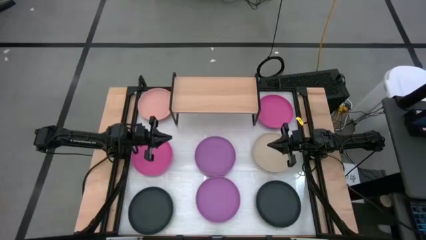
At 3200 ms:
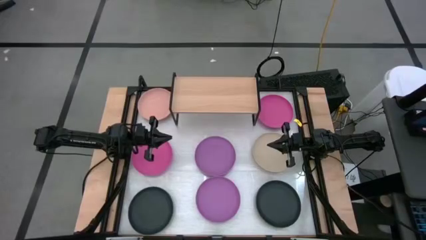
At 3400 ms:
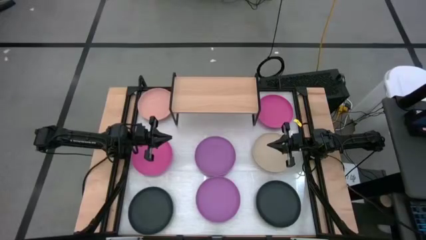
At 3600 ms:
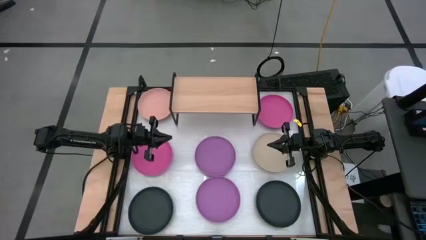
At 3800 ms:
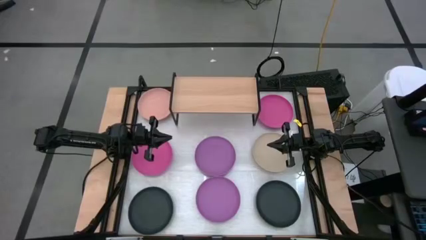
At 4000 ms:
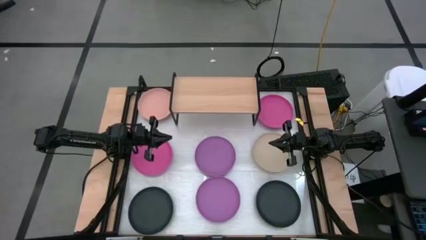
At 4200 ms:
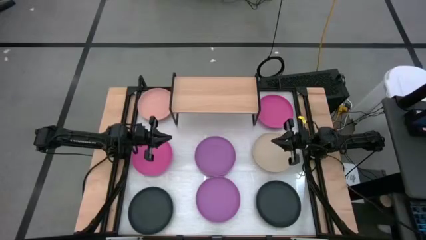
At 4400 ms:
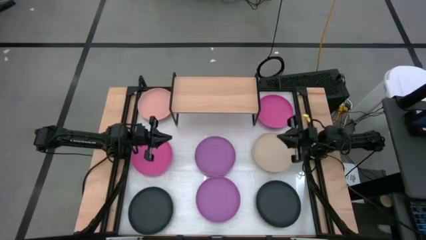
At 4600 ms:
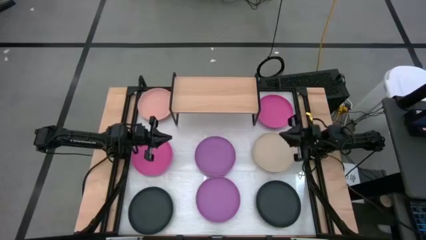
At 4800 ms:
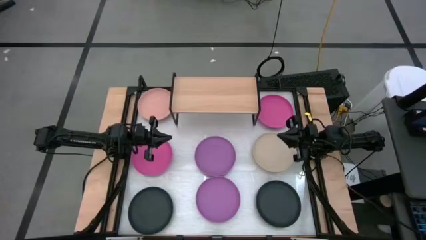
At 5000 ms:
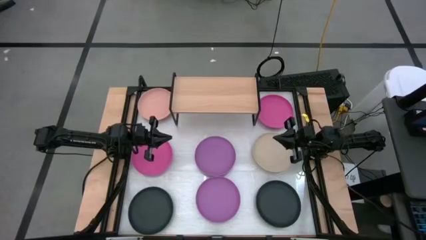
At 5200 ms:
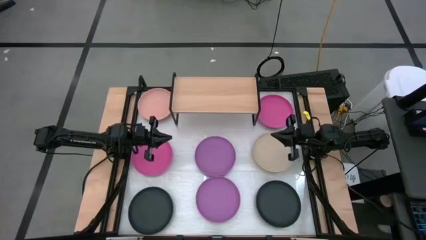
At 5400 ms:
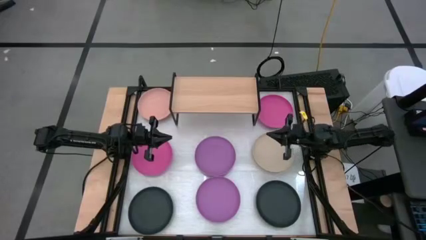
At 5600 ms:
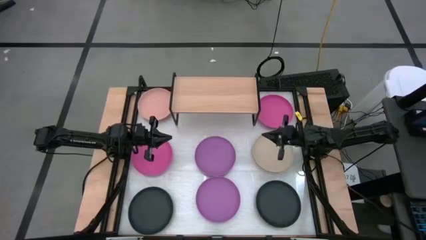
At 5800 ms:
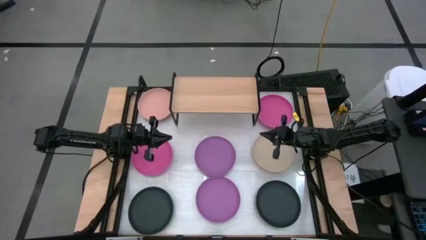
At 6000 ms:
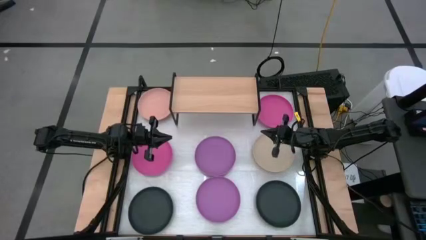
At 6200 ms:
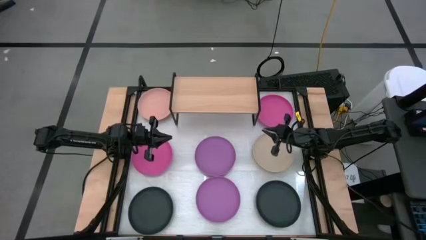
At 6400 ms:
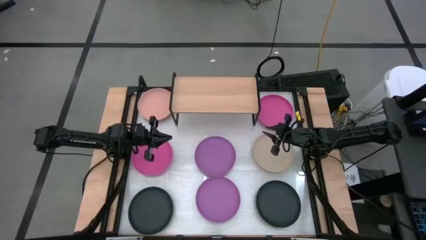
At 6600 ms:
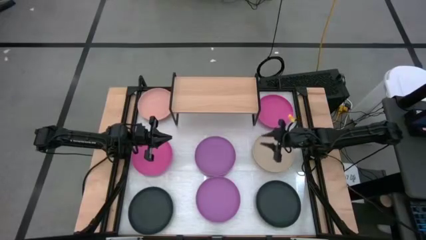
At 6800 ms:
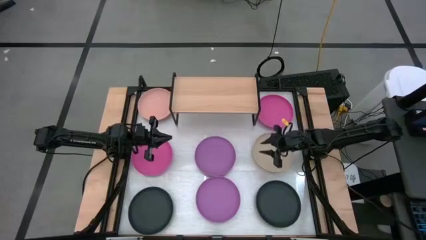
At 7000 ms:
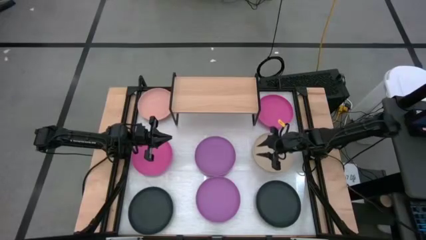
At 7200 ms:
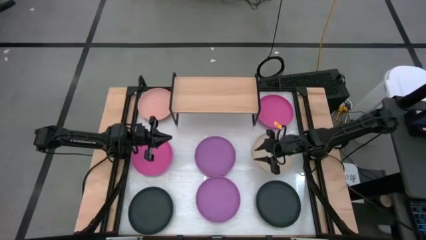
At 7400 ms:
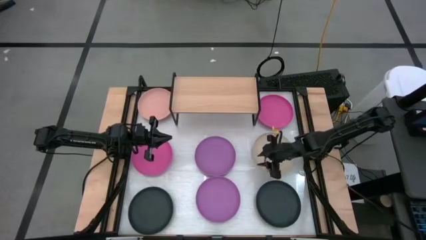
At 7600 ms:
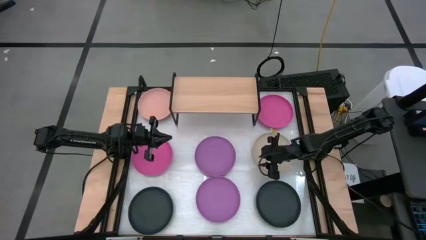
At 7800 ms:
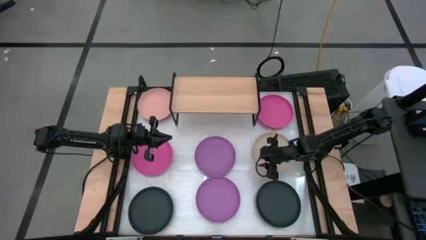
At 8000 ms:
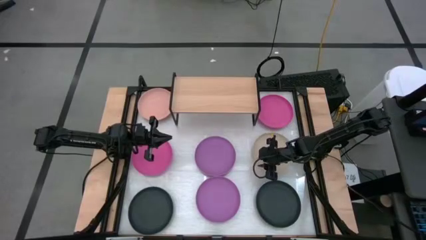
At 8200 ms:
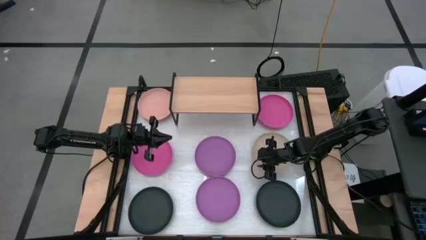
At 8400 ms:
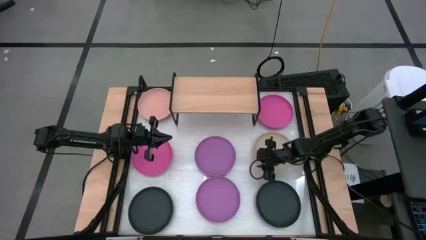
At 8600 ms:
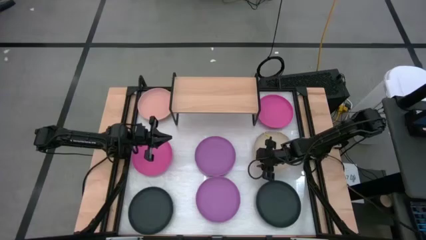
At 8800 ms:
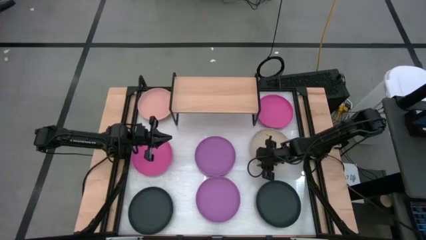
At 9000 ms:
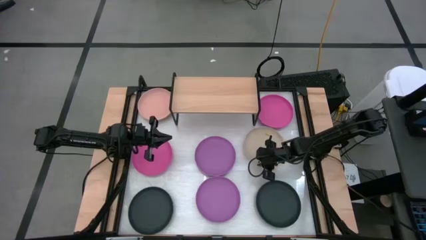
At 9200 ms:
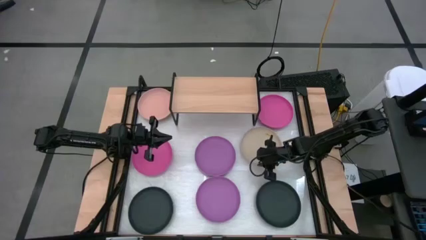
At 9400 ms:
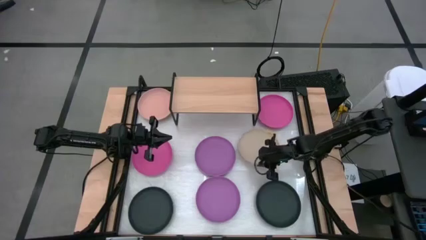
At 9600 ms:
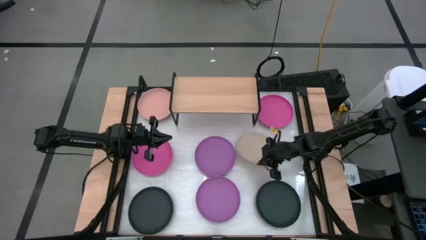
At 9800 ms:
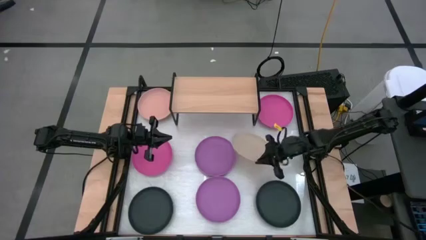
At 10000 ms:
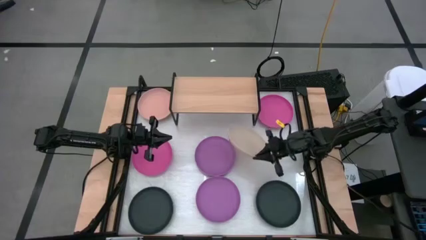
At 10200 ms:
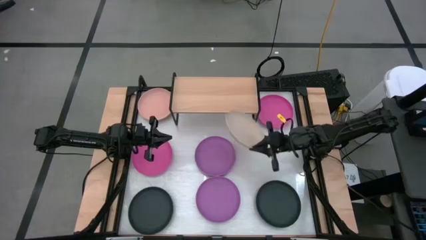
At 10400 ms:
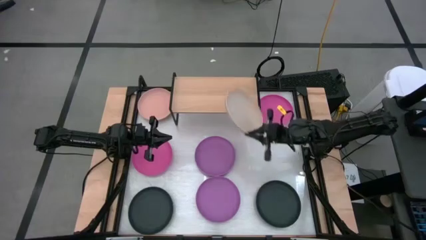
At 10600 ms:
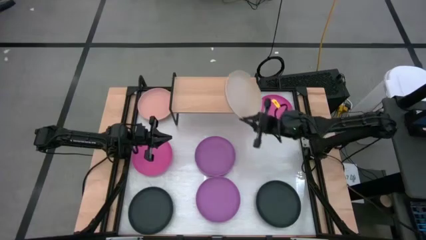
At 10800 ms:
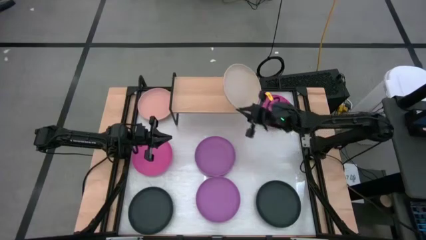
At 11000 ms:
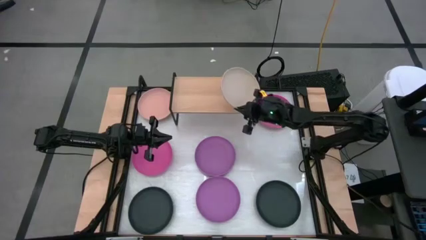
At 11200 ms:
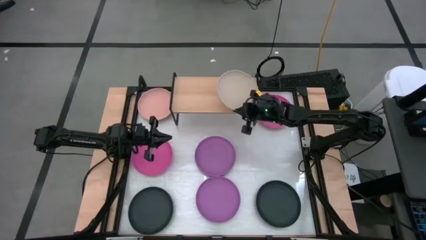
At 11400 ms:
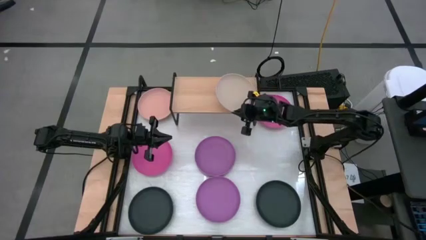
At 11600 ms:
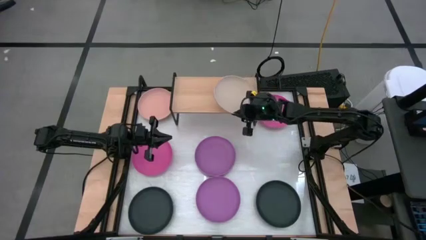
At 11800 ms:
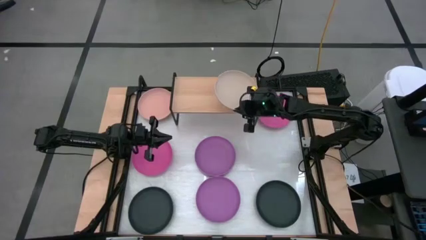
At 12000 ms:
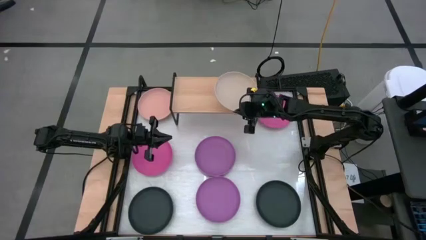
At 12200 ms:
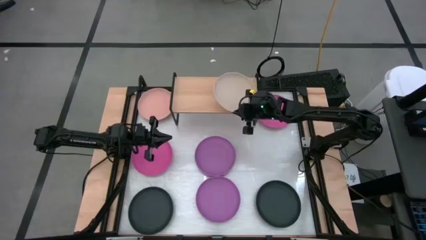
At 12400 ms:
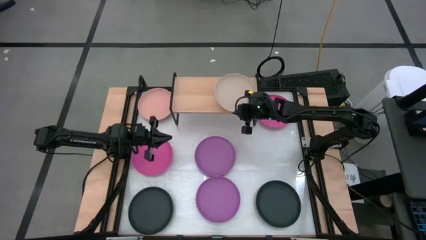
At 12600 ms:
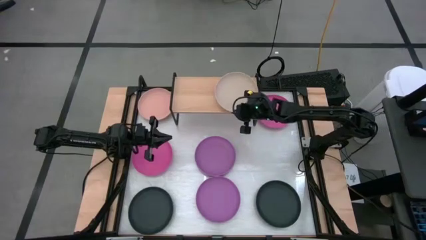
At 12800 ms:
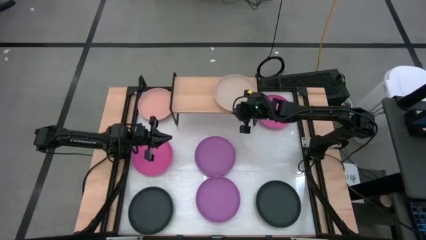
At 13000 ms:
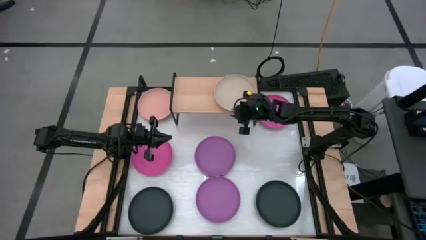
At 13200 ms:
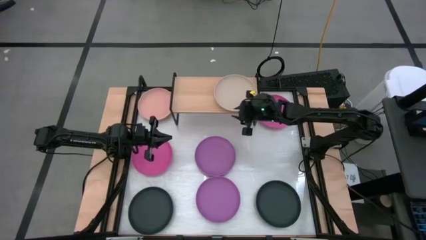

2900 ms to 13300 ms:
Task: Place and stack plates onto a shelf
Put the brown plate on the shelf

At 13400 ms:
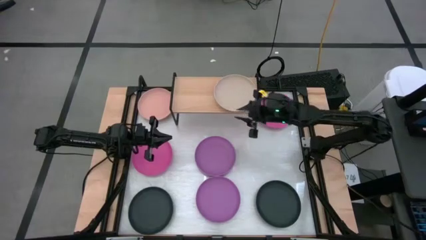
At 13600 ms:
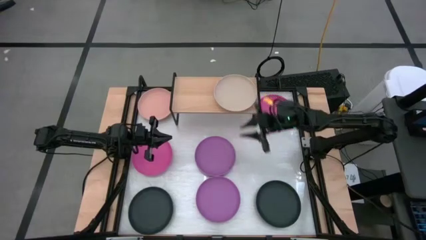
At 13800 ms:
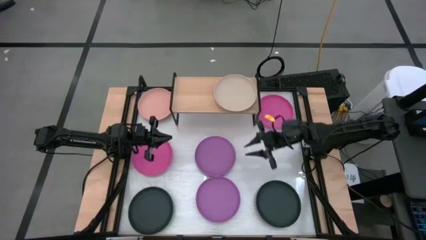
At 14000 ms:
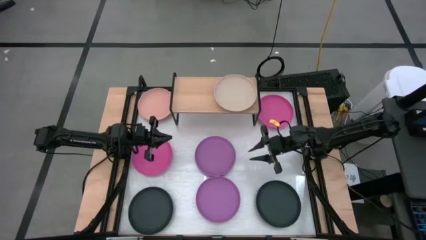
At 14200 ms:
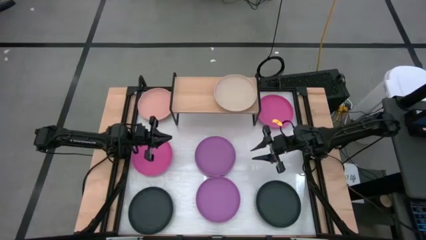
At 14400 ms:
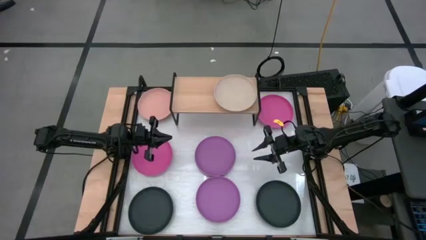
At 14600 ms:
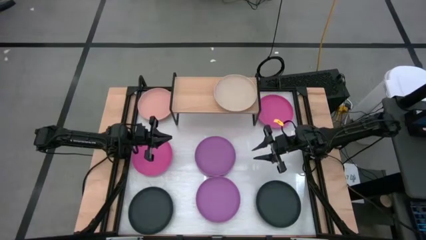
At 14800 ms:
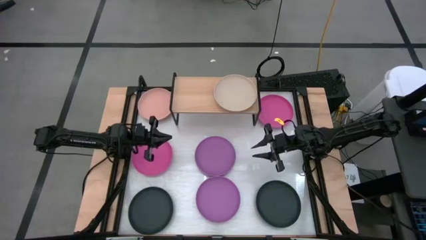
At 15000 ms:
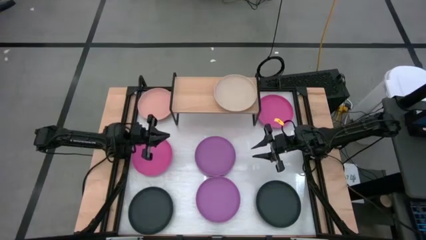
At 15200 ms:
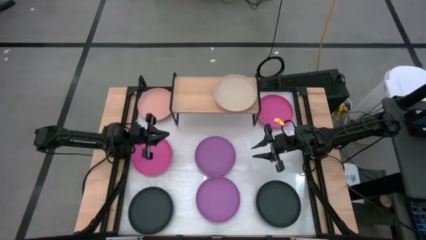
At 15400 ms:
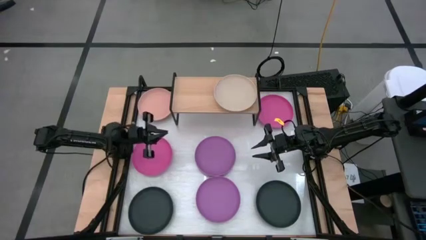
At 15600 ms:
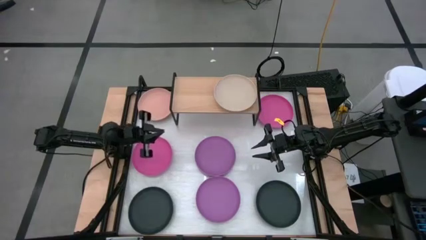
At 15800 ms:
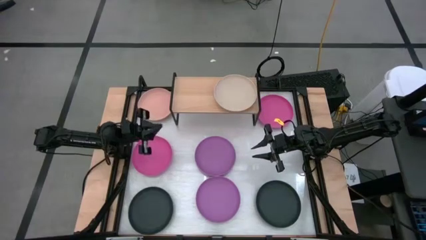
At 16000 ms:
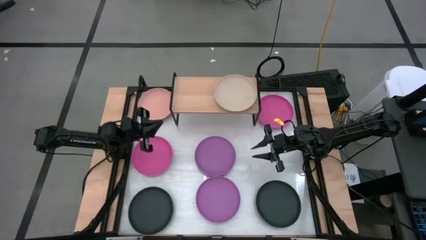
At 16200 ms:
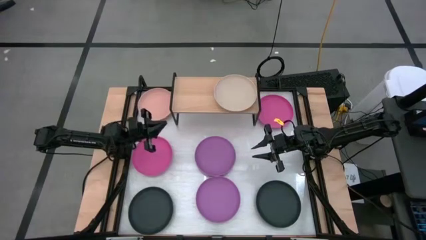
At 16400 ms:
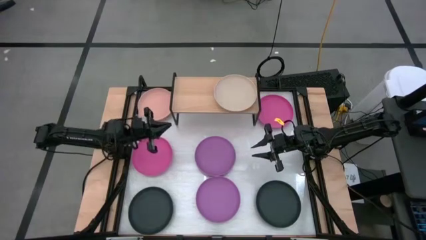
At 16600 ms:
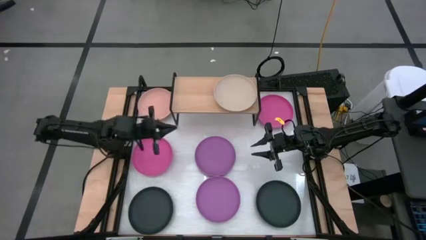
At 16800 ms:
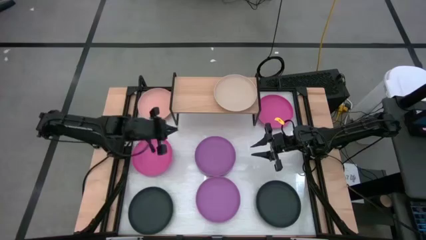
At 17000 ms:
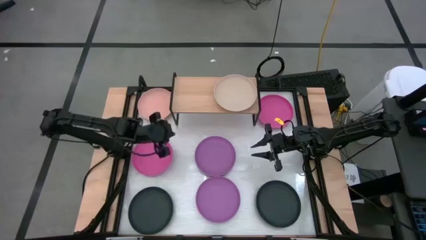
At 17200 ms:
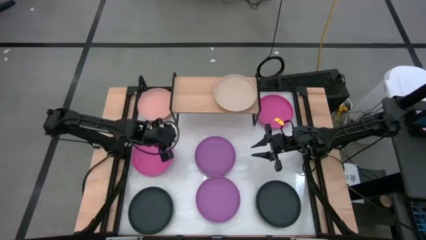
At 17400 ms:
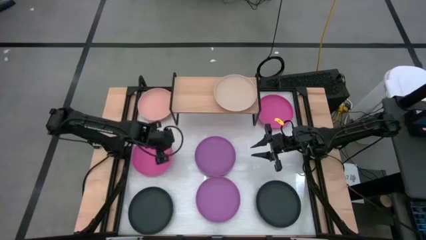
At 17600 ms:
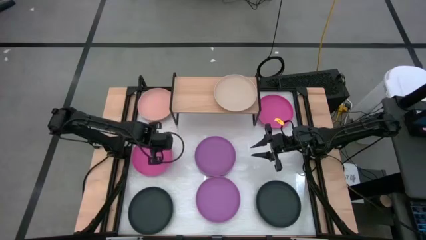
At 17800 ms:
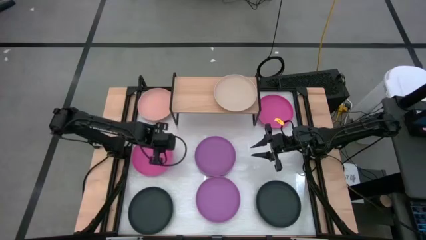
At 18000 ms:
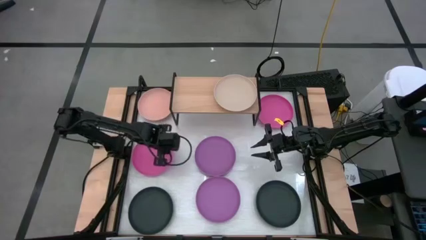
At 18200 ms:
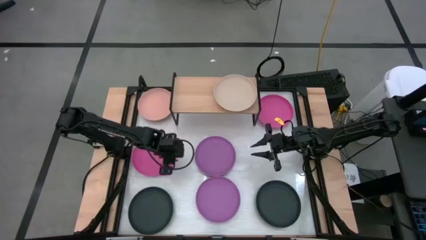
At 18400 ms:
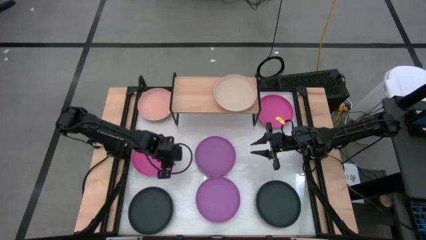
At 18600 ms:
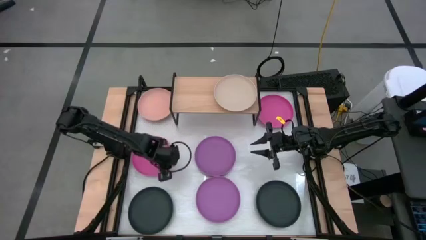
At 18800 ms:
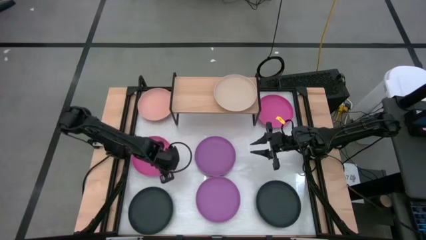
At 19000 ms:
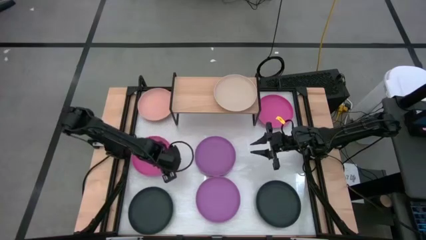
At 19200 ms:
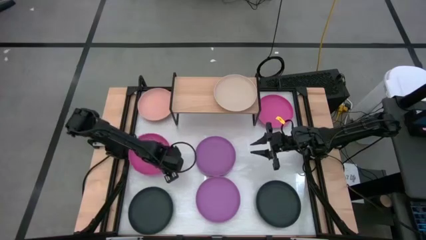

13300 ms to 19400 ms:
Stack the left pink plate on top of the brown plate on the shelf
